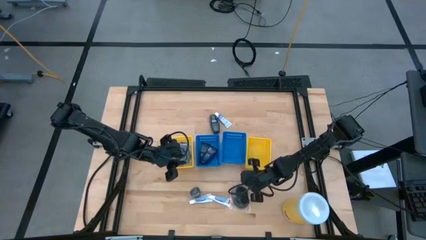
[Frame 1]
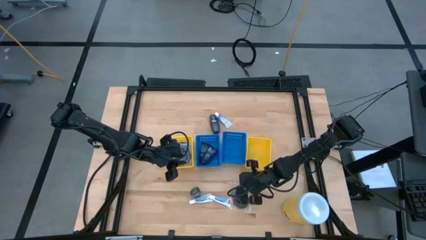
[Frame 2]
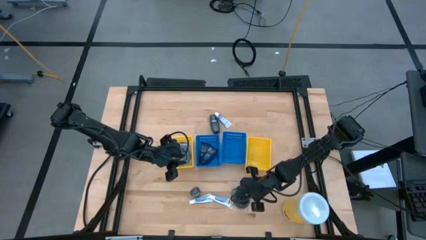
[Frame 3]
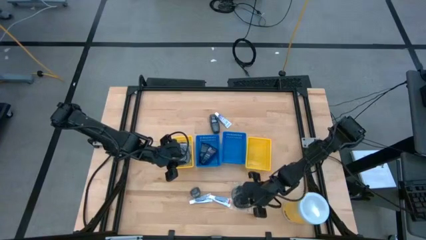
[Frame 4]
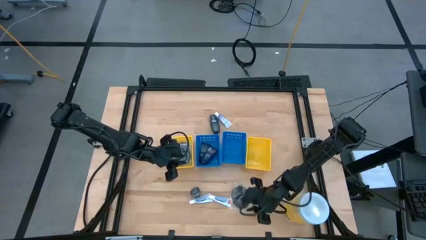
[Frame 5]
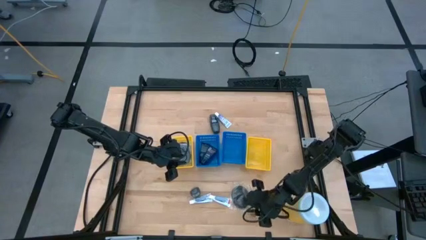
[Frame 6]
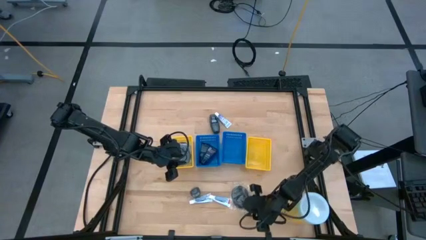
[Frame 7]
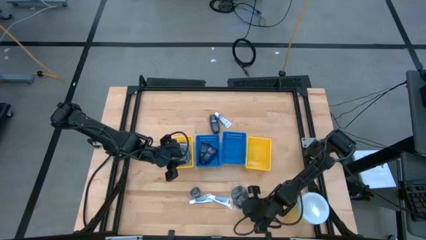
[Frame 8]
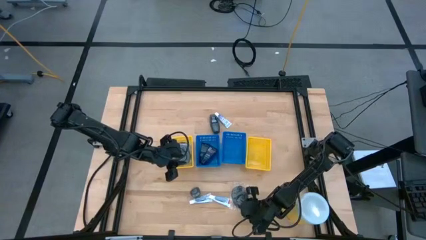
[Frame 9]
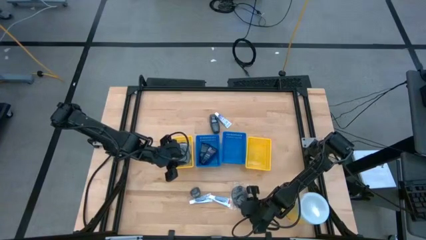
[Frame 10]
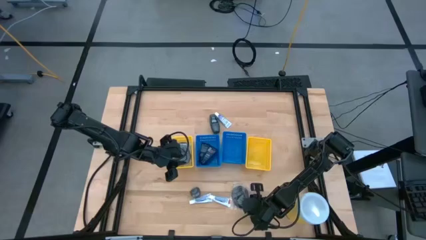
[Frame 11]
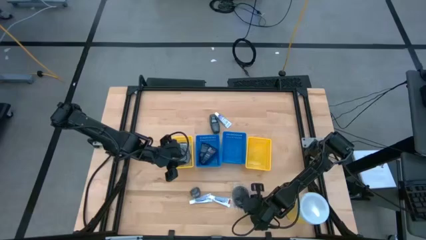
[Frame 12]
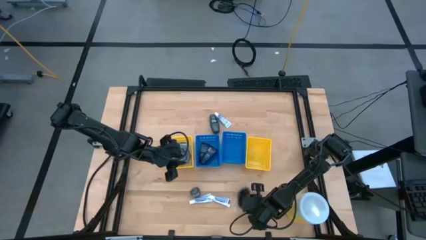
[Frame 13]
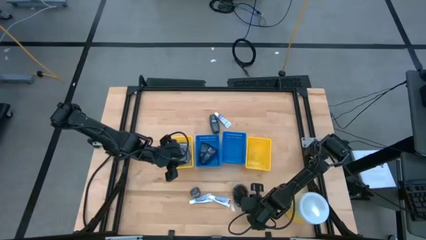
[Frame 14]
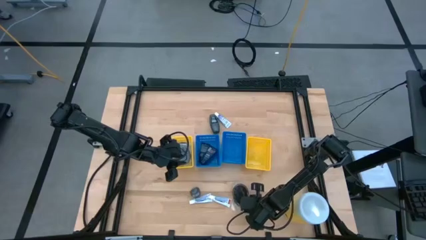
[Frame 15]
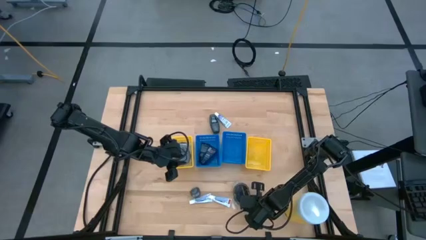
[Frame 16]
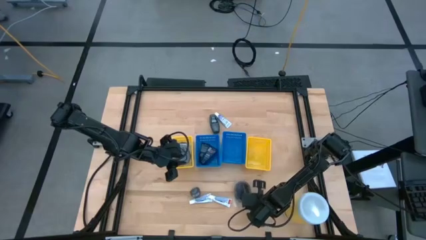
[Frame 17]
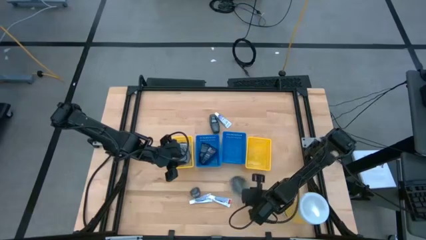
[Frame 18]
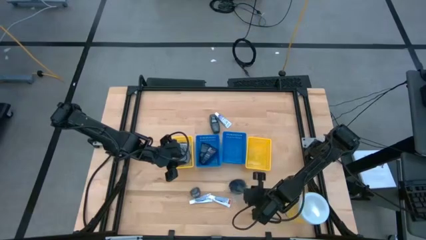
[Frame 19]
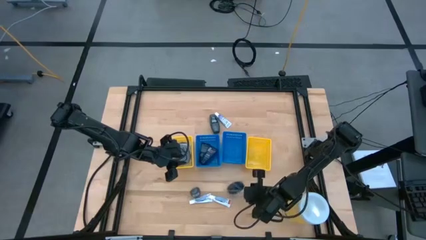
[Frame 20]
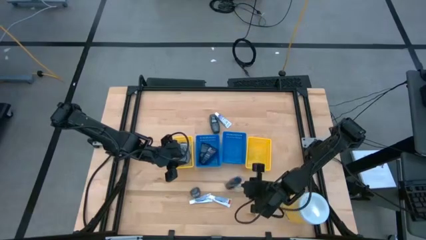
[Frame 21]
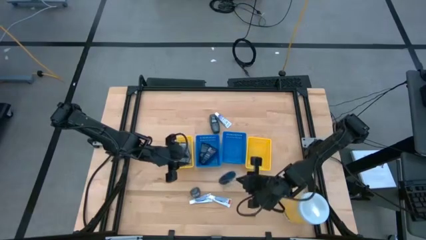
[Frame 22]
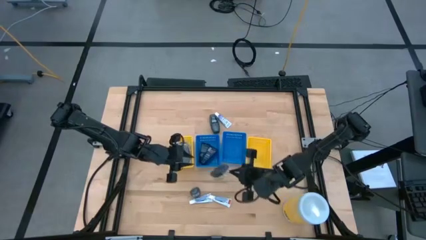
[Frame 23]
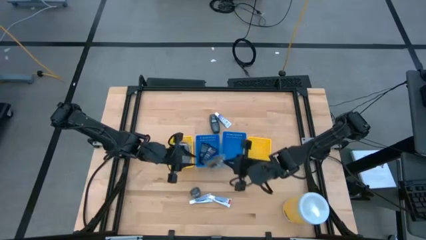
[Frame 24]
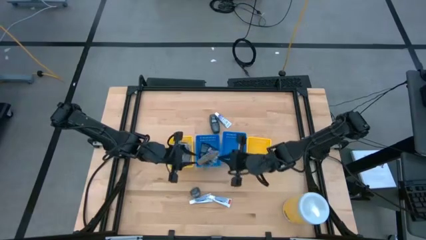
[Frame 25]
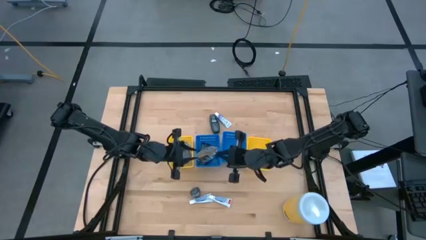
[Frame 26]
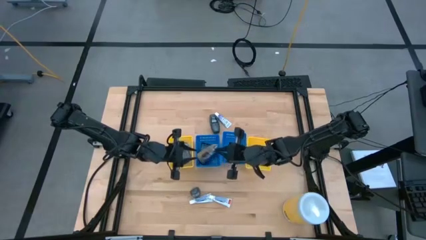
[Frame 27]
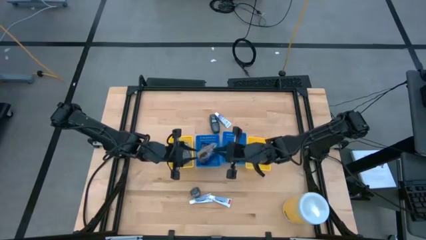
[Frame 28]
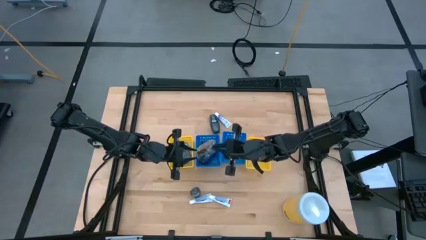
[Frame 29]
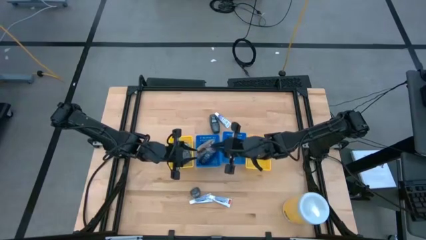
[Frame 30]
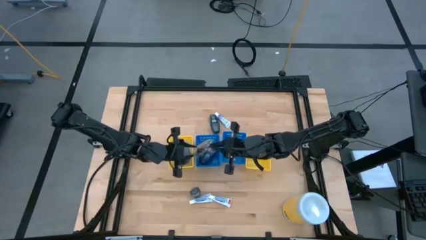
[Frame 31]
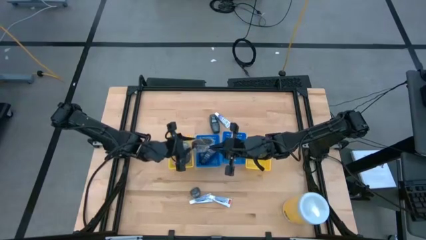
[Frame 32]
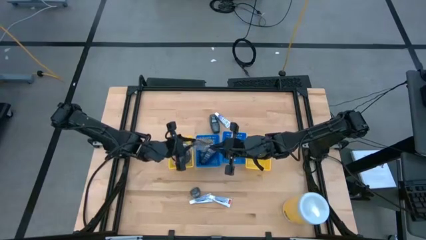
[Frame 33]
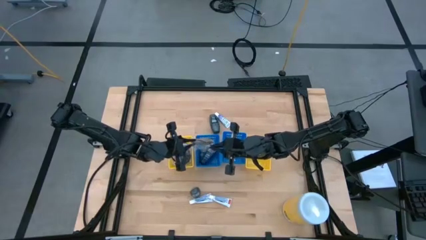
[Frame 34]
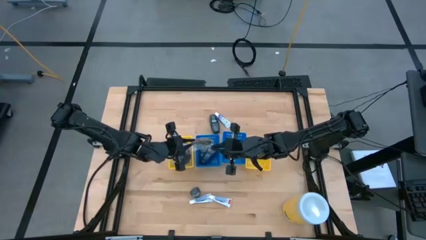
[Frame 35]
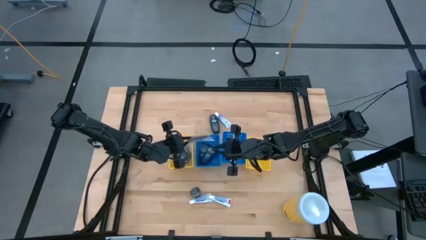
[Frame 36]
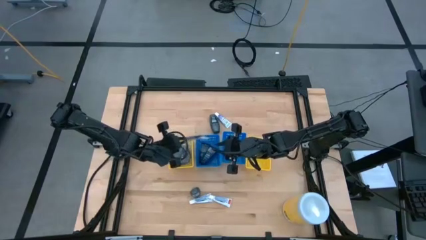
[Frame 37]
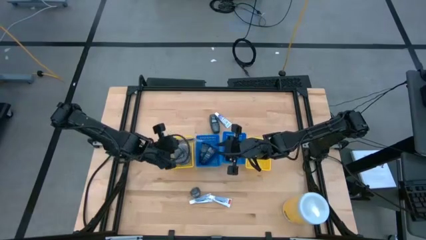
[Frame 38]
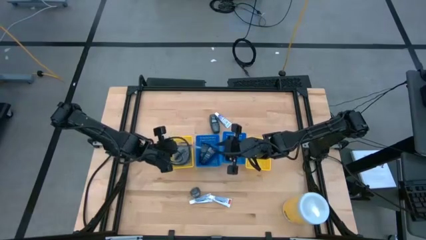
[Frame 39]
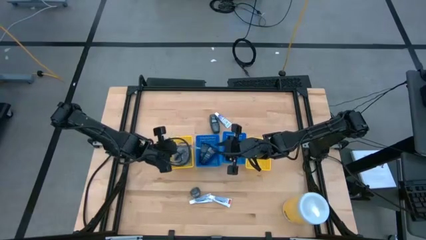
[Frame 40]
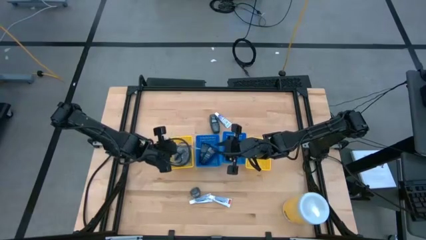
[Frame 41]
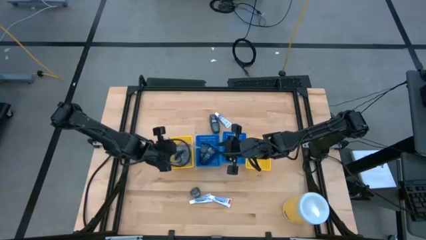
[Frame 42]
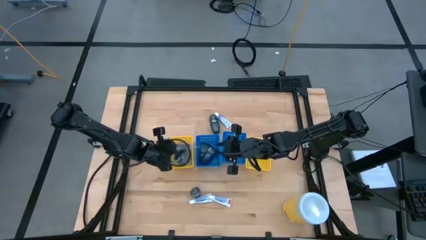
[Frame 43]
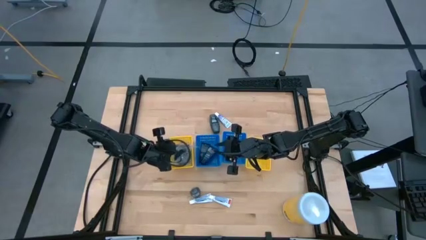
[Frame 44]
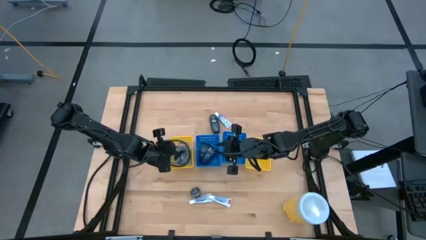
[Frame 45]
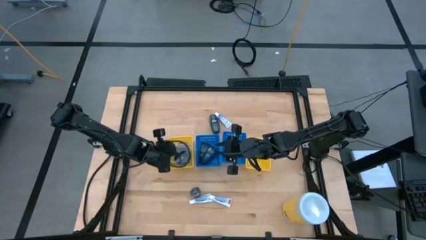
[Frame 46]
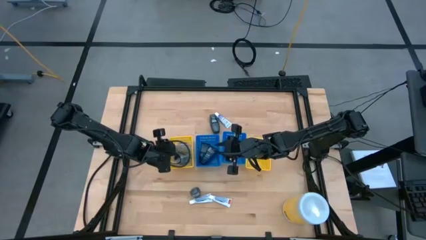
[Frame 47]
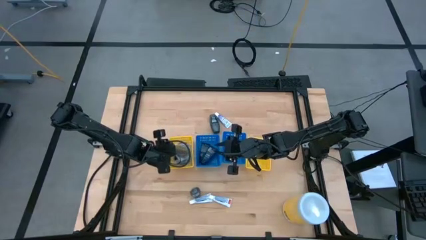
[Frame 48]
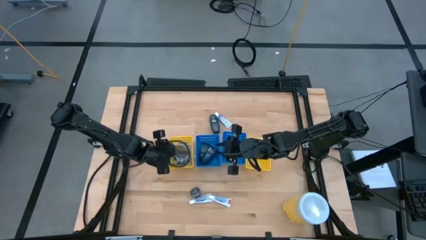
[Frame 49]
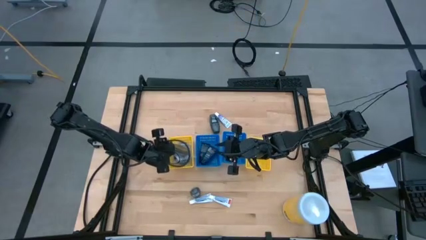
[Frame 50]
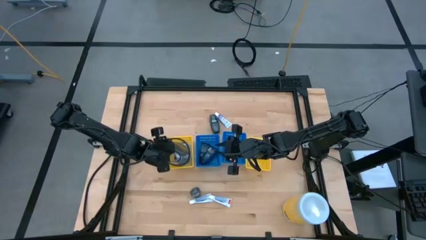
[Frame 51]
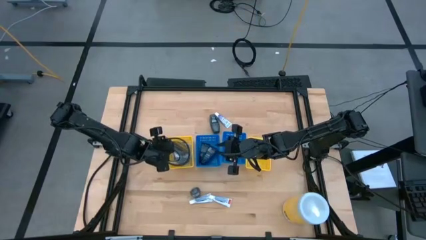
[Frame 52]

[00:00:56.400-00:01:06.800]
Task: Pick & Place Travel size toiletries
Put the hairbrush into the left yellow bin

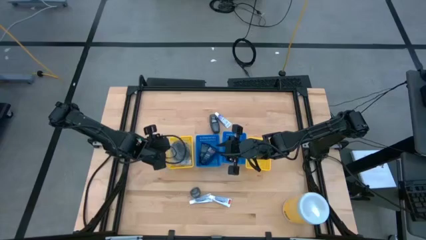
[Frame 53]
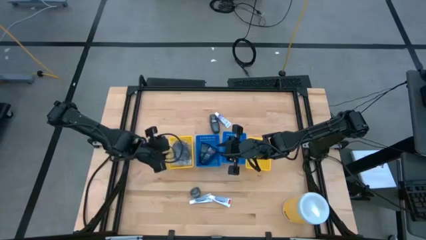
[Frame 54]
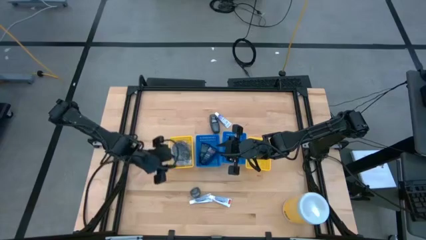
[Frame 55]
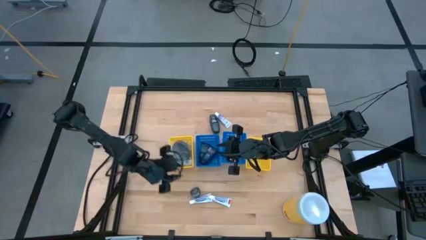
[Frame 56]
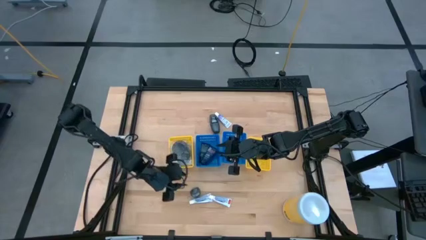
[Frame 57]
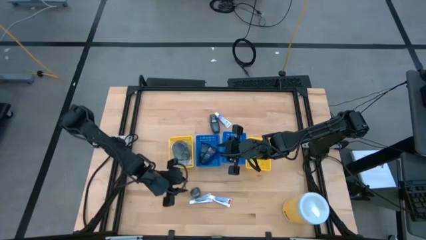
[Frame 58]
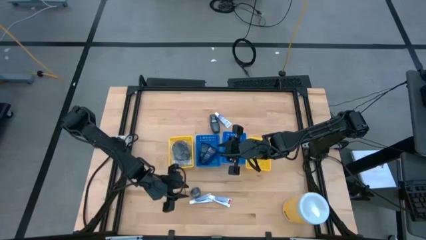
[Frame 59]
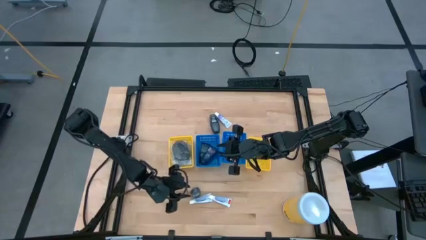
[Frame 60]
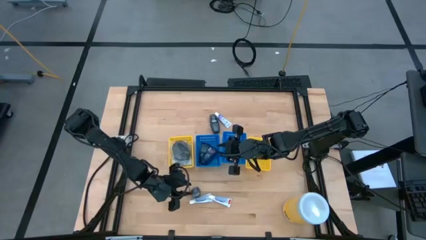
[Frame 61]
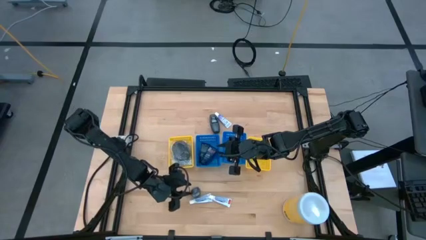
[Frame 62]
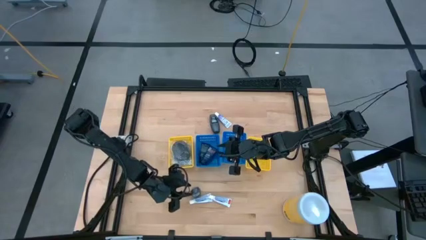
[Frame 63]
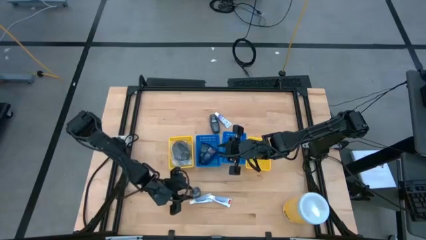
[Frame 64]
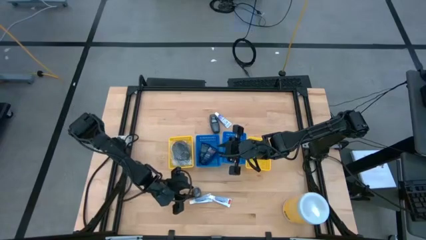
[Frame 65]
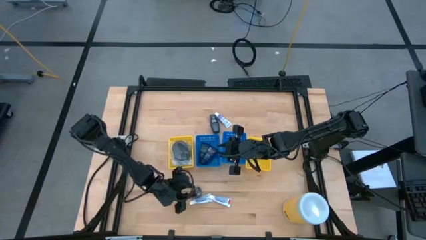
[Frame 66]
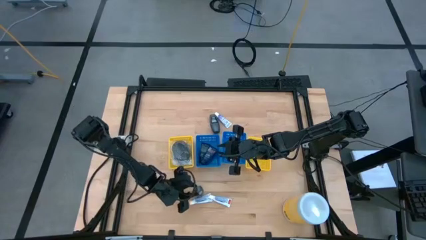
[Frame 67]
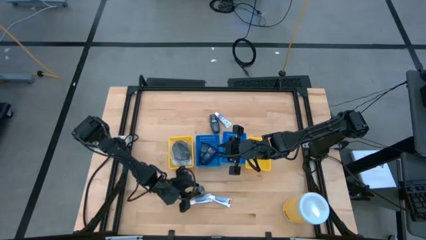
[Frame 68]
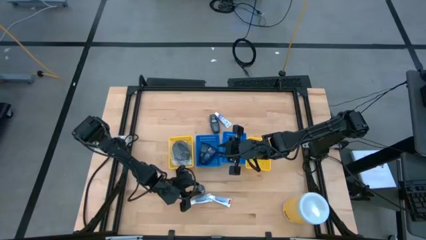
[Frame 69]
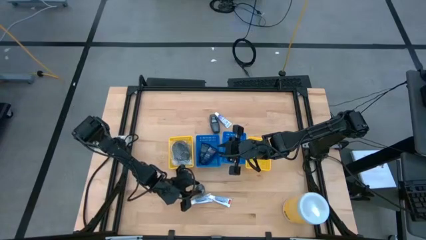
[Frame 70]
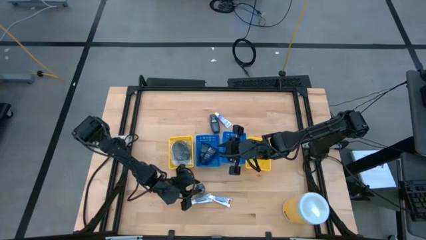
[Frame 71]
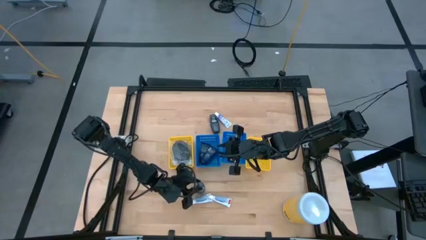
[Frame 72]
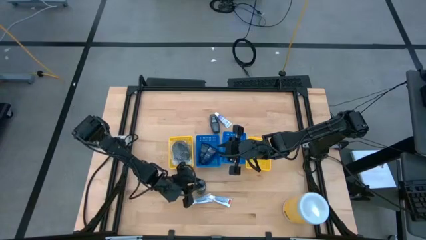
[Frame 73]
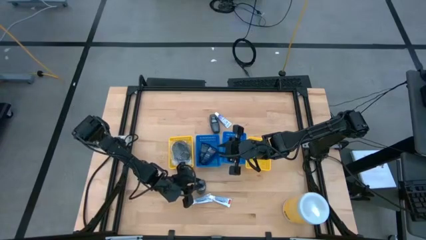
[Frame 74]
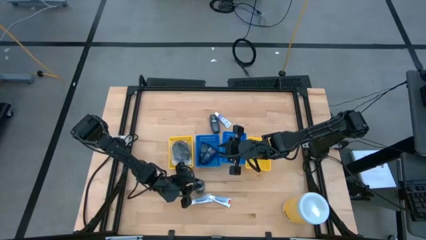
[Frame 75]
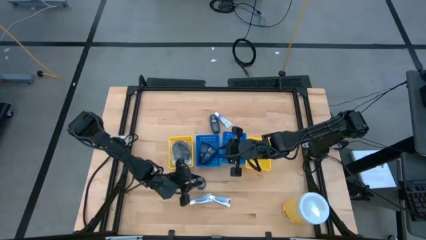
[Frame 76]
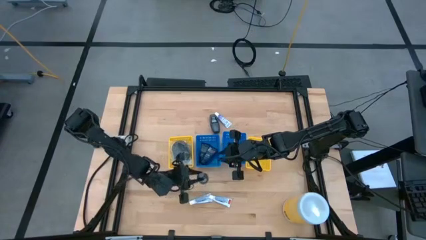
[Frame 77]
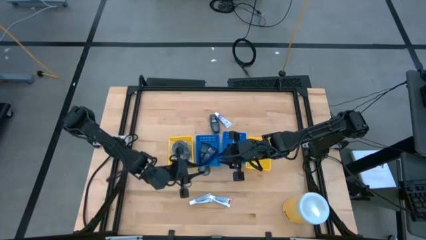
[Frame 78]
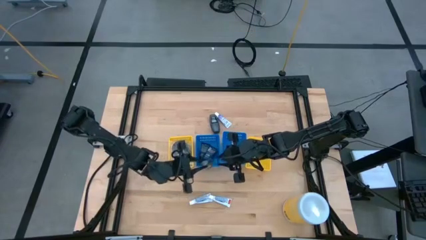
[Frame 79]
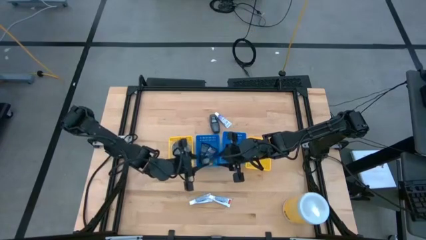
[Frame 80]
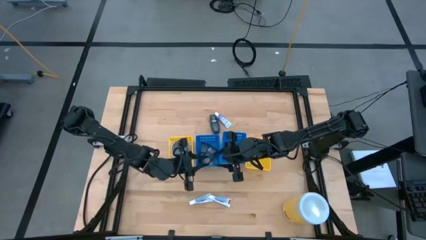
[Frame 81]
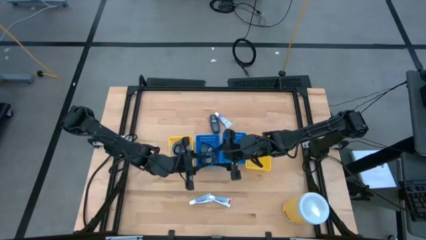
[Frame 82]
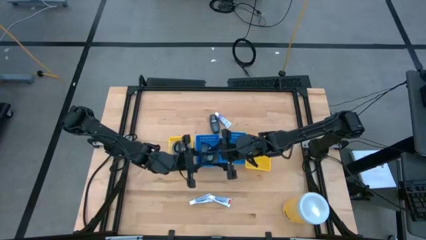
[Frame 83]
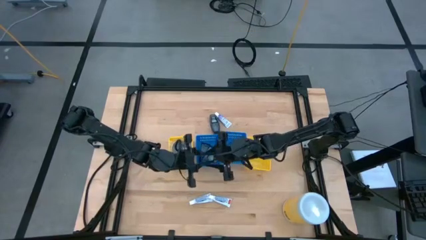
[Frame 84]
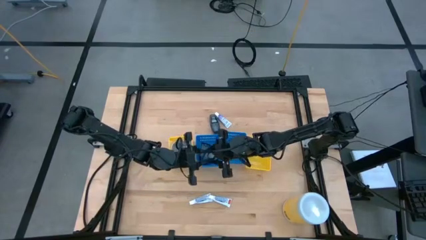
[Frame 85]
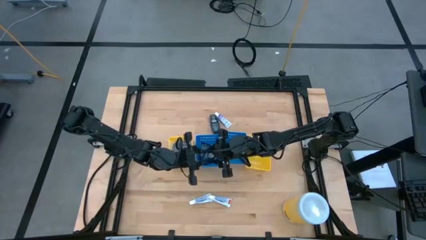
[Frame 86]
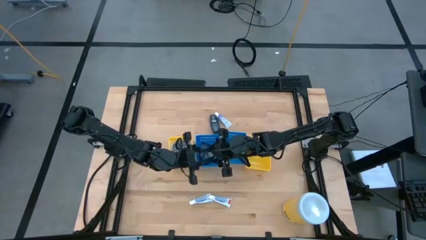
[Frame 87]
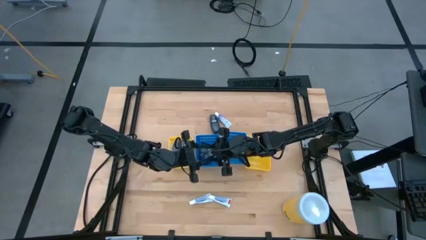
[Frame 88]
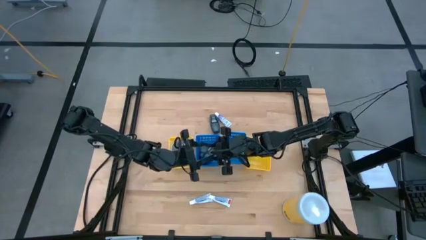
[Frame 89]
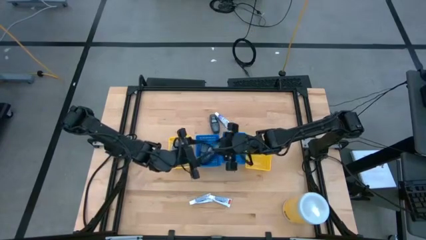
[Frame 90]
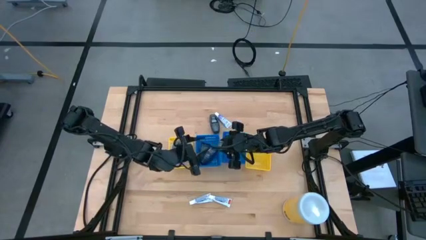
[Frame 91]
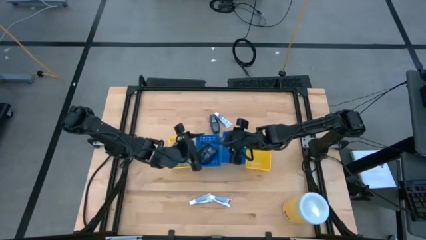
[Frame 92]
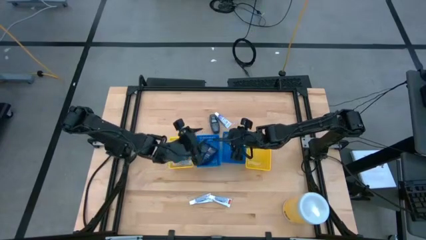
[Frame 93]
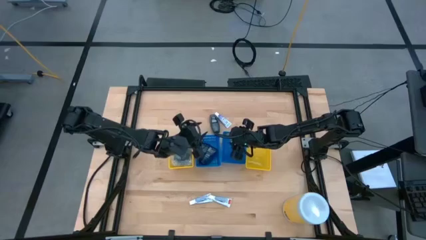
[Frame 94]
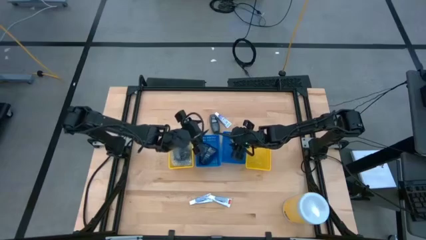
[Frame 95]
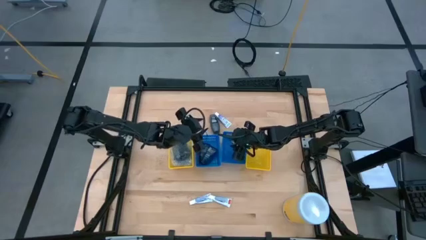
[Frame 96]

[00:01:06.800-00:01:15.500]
Put the gray roll-on into the right blue bin
